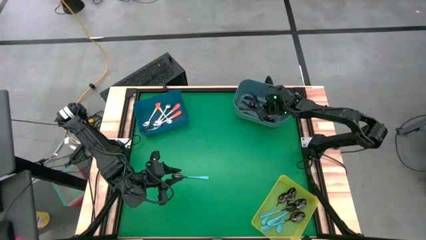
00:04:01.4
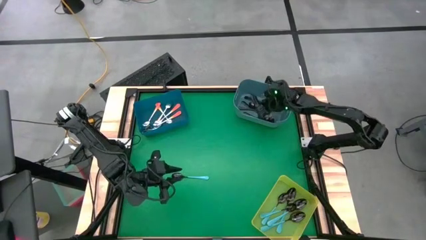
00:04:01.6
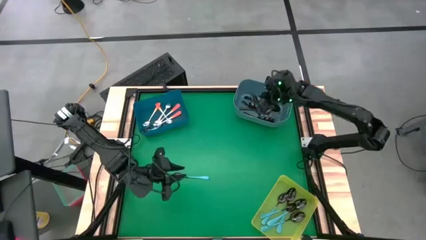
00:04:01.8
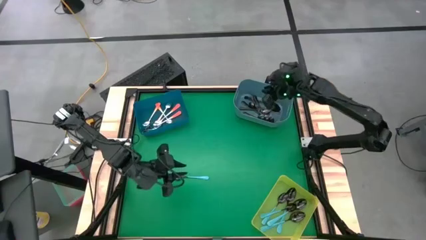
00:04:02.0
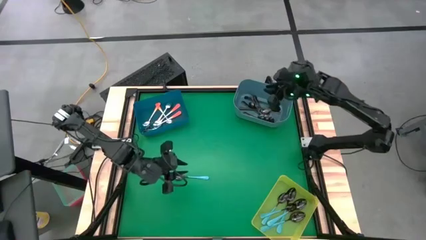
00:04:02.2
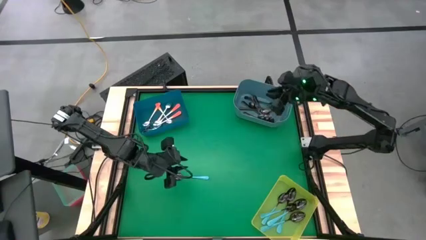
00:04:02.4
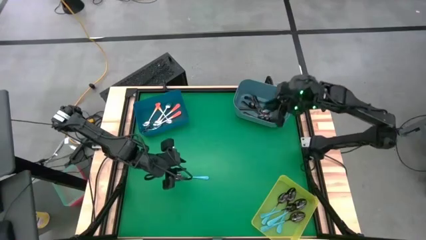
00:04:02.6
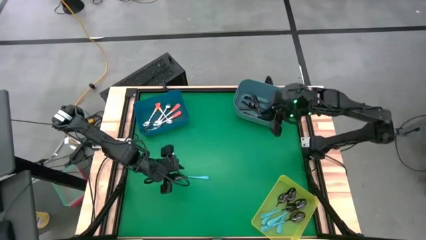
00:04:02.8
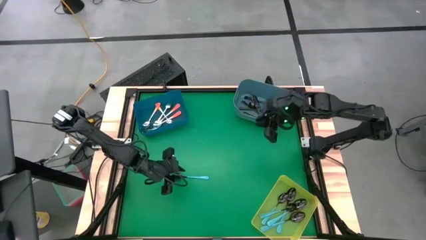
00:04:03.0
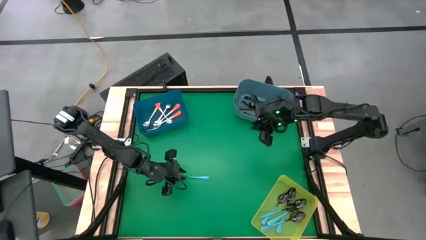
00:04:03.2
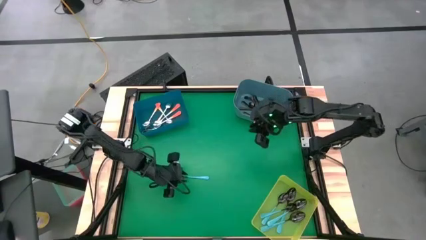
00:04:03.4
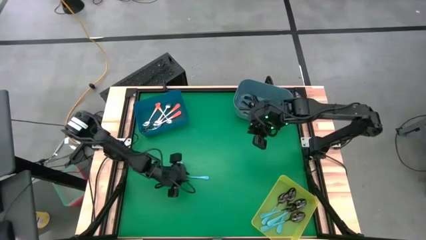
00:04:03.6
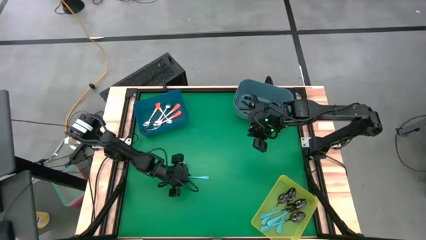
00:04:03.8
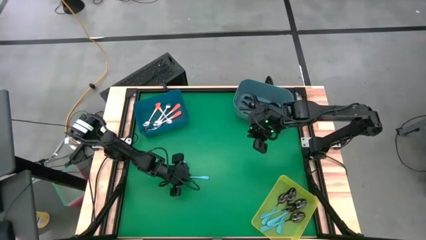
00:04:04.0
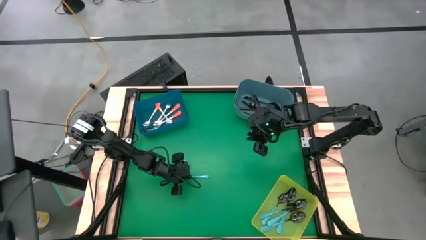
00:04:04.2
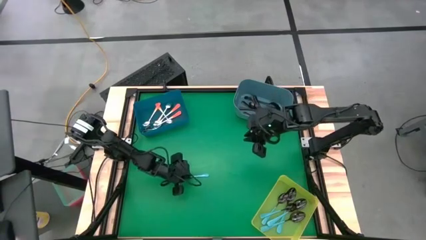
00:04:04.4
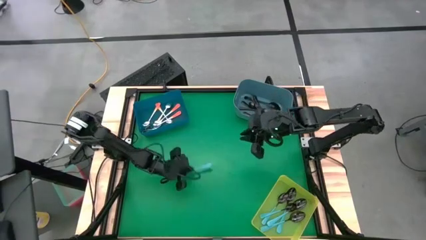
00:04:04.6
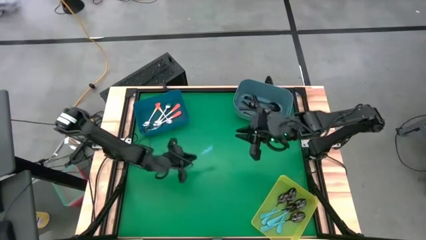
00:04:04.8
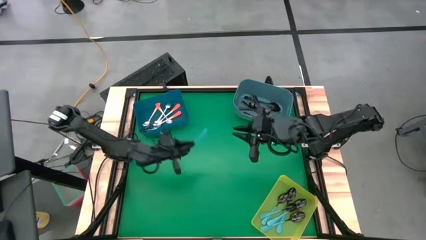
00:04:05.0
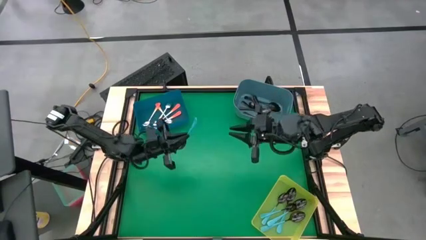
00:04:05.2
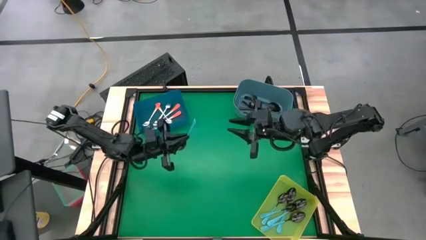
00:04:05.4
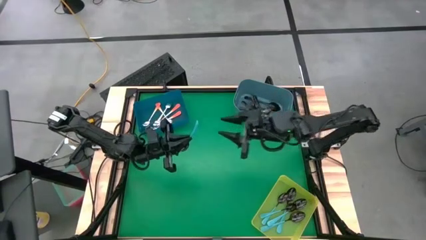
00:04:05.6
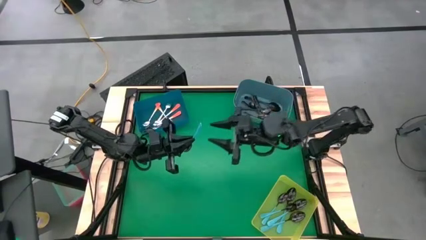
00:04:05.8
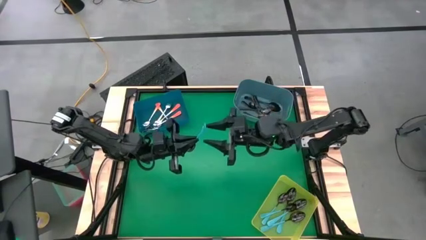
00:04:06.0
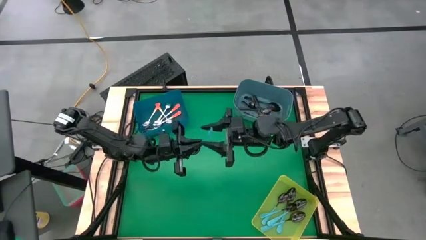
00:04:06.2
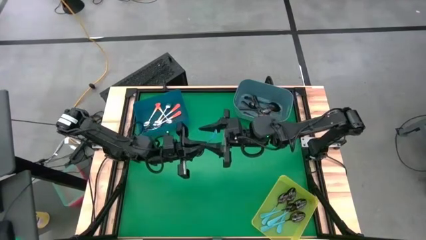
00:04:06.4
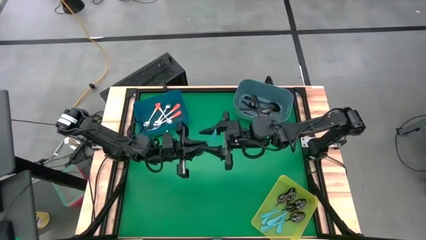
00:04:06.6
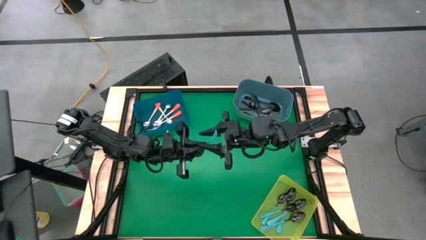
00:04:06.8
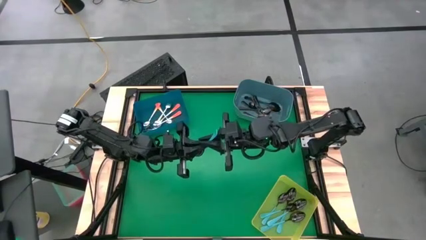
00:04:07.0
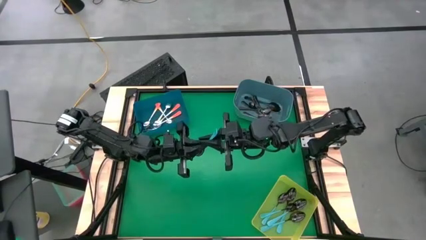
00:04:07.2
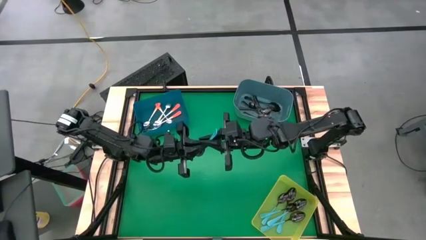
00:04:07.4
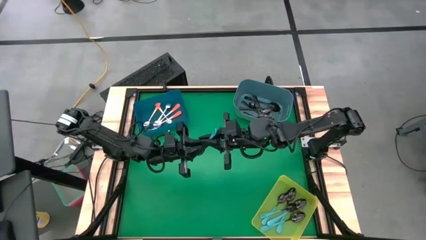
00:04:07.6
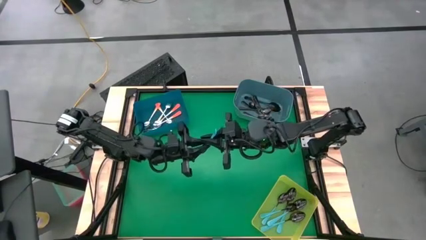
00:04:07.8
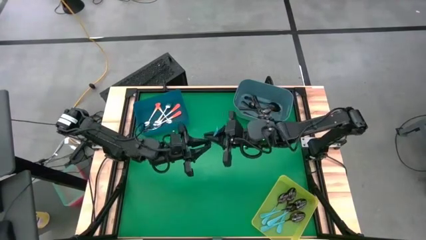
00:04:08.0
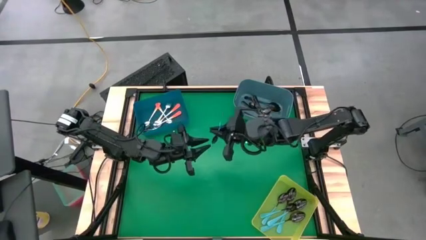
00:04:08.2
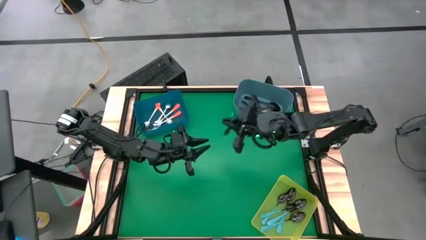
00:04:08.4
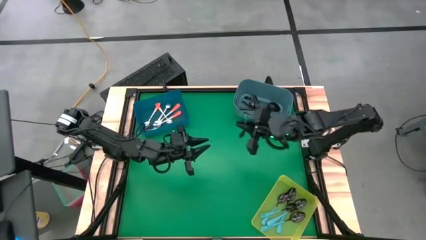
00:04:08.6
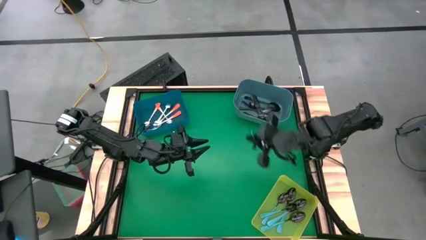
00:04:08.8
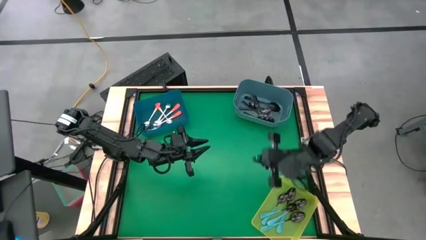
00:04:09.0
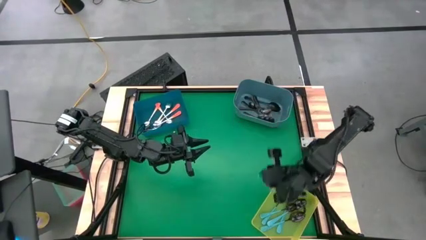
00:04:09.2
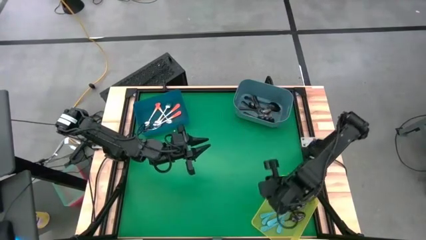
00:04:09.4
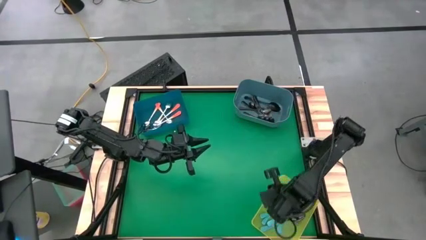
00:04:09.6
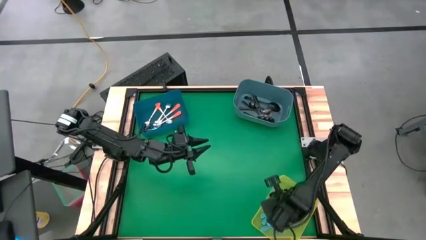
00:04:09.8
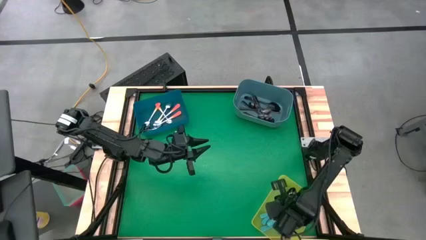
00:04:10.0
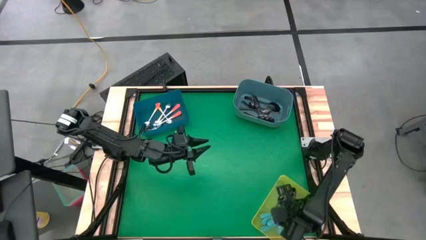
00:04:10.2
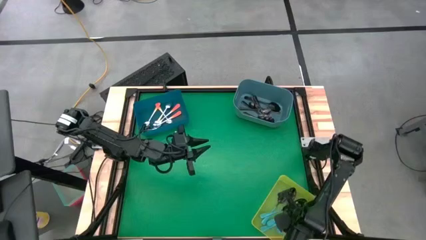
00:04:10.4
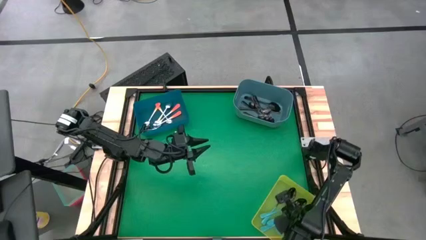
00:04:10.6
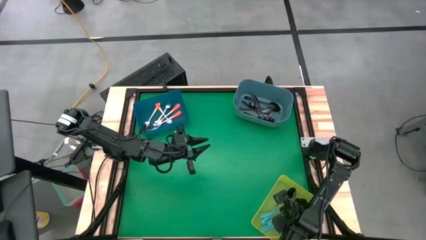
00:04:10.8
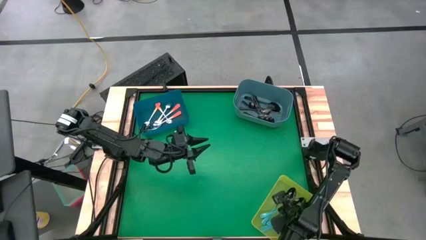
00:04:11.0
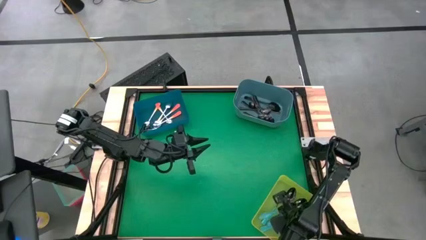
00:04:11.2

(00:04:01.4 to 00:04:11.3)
Task: Sort silverware by color (type)
Put the blue spoon into the yellow bin

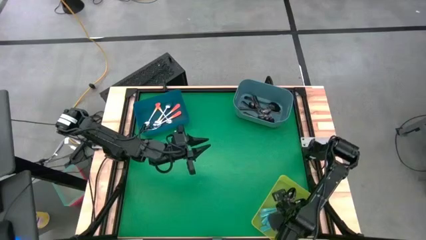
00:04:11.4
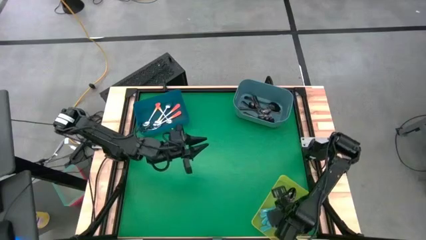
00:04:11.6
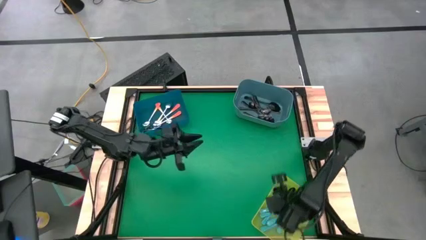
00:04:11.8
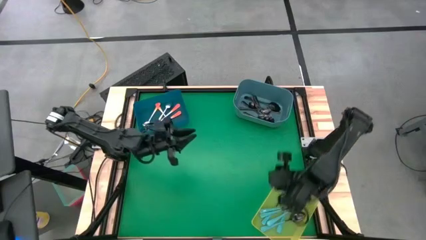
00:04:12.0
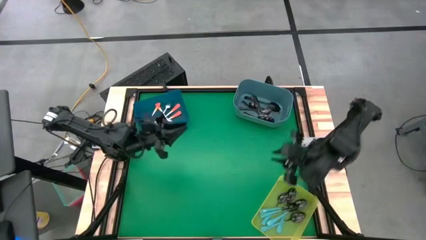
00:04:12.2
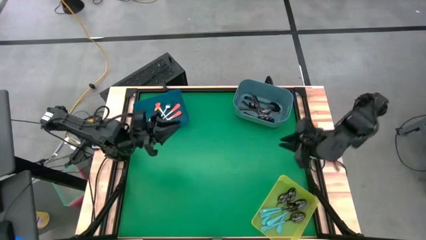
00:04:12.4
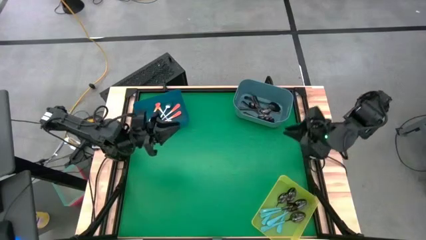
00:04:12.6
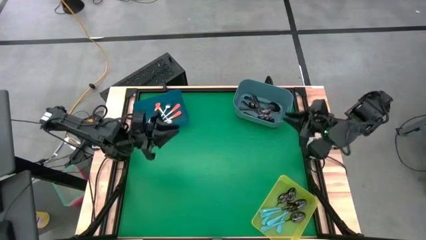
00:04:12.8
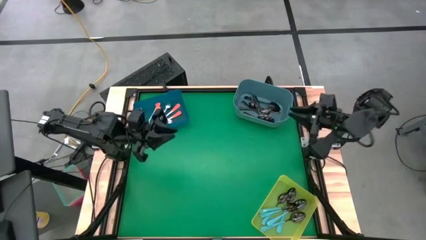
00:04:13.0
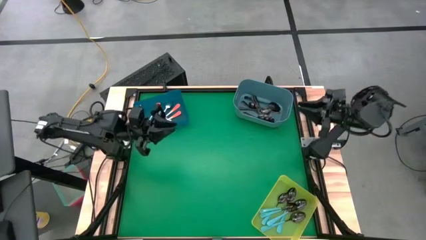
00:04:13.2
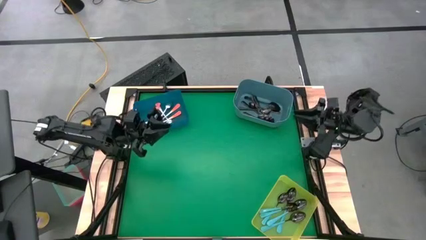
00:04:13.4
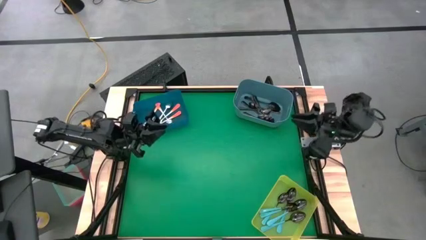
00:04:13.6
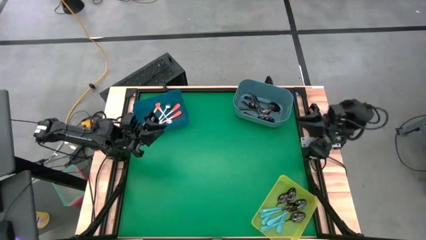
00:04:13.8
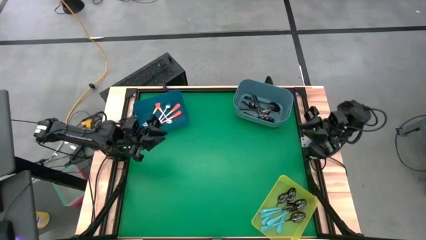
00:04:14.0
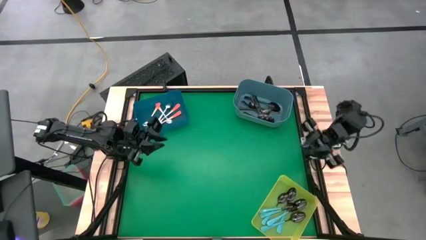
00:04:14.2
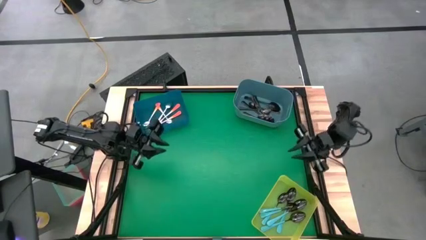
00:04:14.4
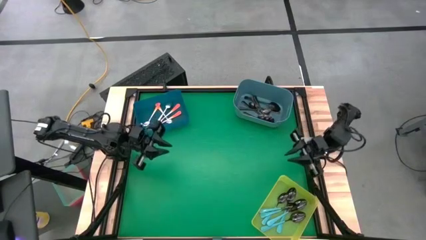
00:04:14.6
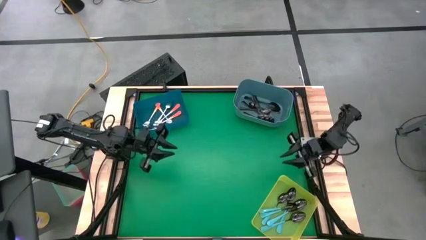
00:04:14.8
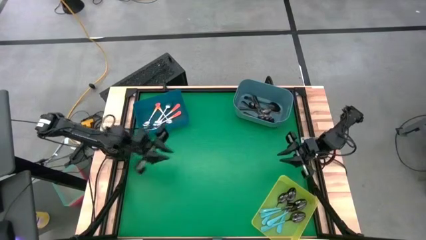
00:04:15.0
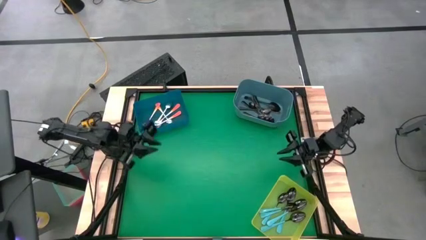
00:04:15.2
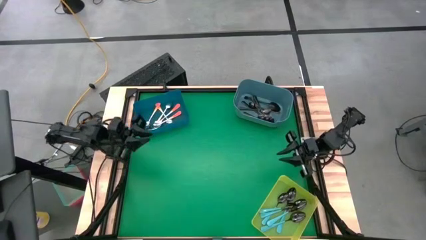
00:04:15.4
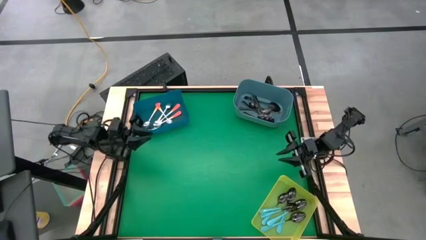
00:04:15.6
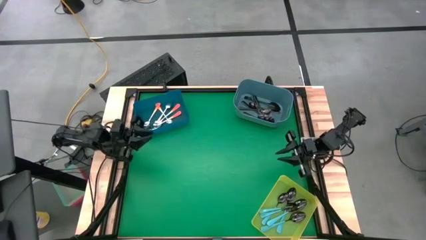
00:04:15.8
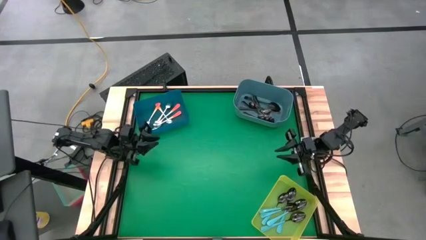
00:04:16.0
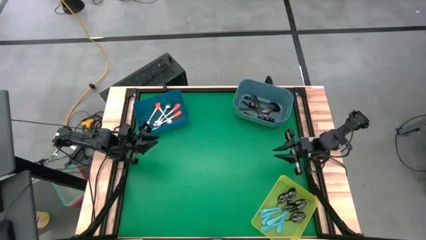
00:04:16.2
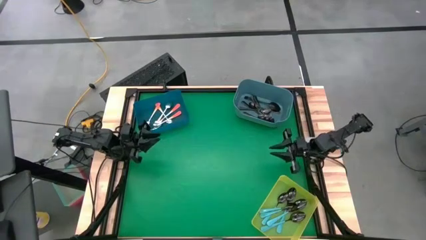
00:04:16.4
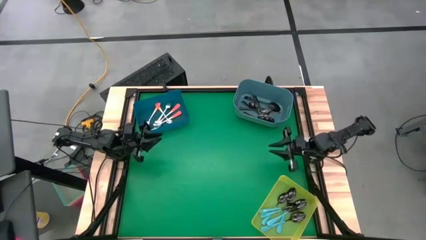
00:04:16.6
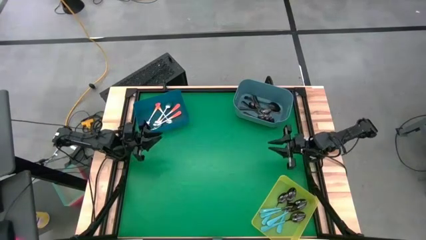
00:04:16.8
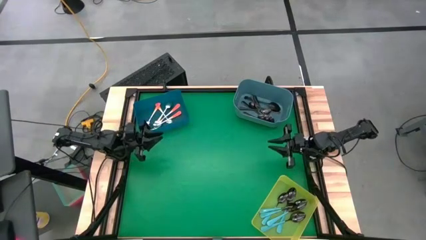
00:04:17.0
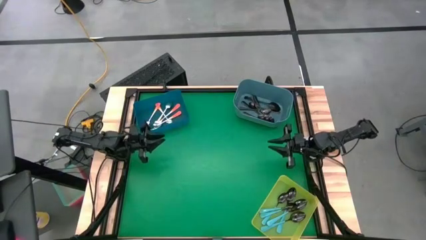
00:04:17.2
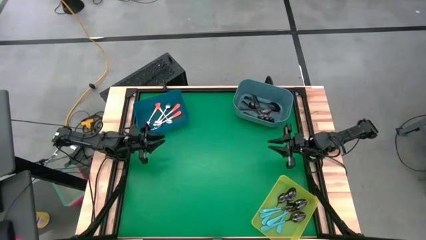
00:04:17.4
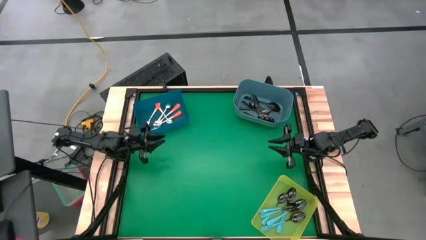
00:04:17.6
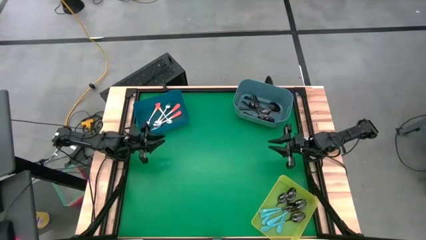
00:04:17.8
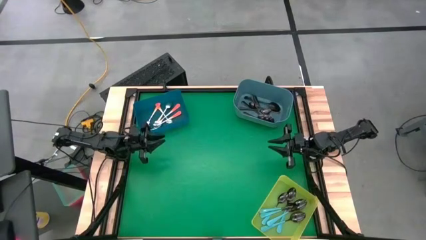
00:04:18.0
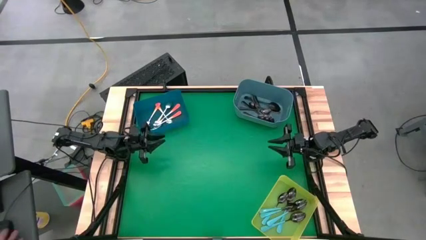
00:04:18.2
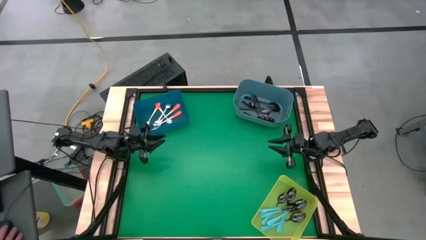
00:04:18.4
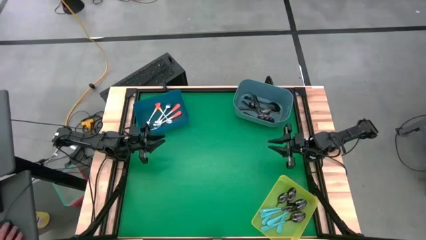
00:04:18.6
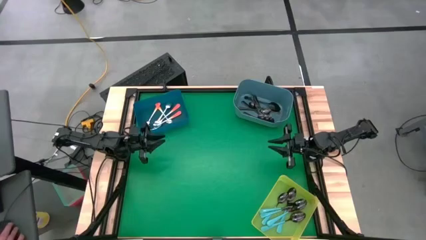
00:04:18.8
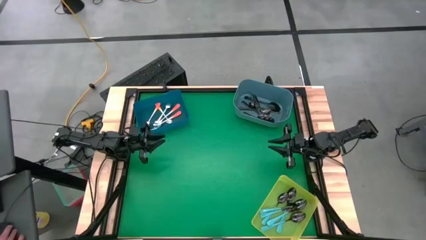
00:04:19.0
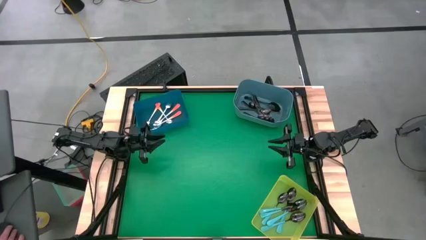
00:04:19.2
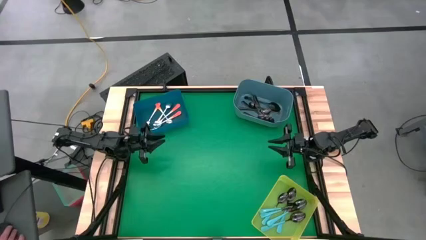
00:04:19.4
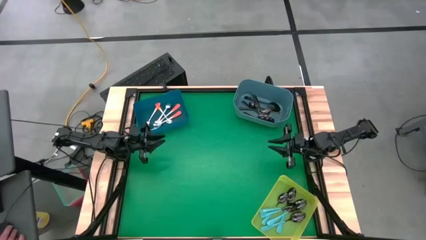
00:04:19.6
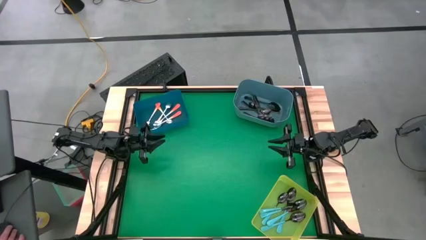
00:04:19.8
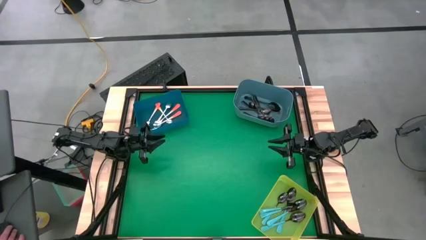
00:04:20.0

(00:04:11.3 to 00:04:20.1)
Return to Home Position
